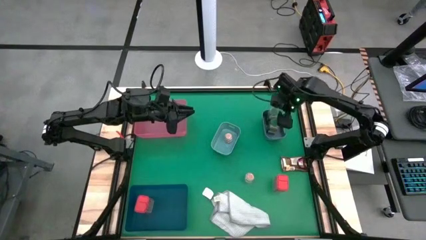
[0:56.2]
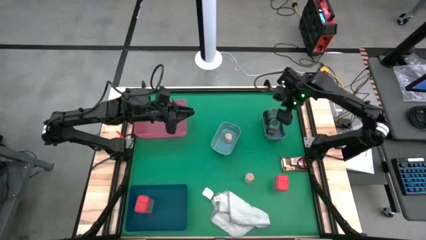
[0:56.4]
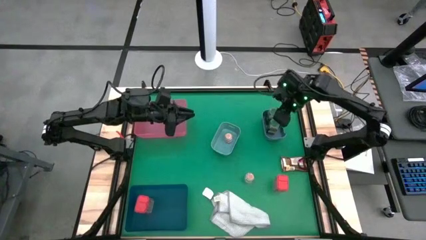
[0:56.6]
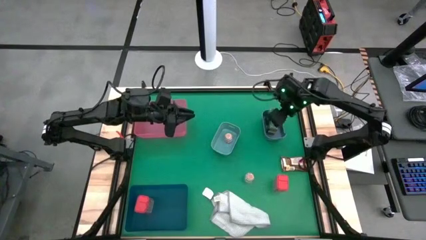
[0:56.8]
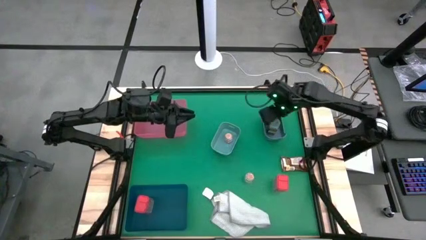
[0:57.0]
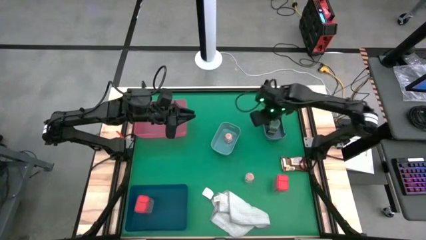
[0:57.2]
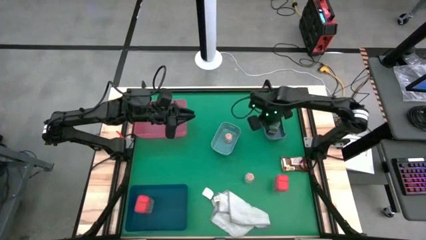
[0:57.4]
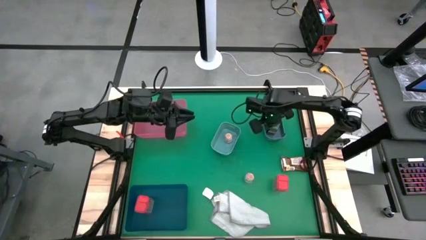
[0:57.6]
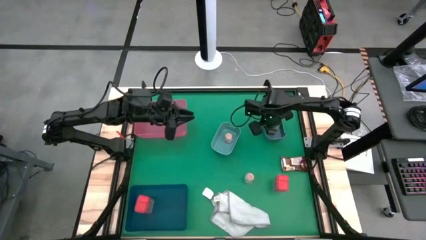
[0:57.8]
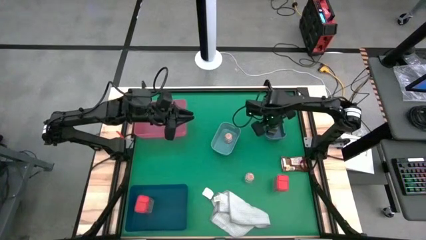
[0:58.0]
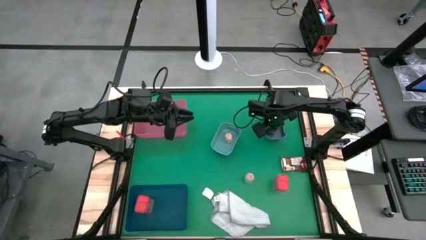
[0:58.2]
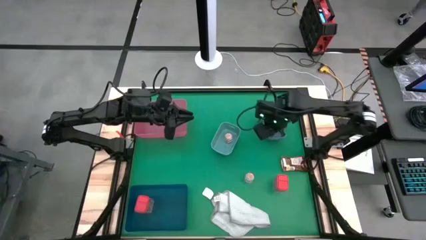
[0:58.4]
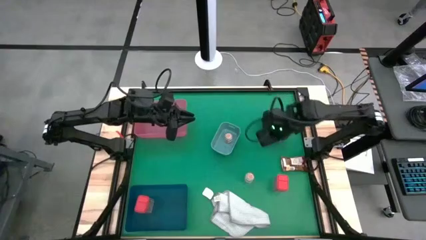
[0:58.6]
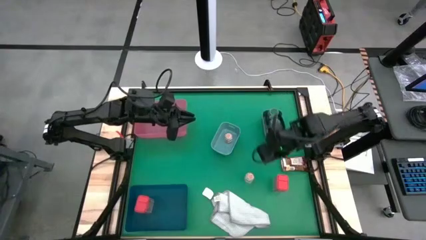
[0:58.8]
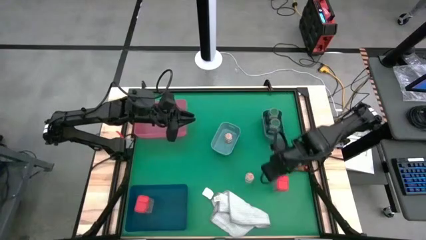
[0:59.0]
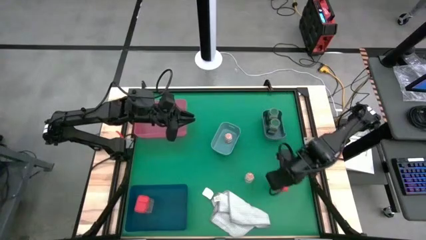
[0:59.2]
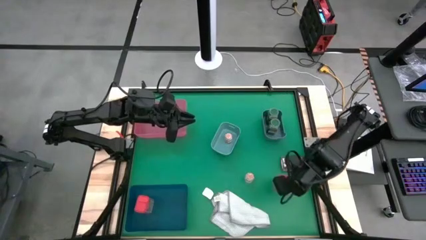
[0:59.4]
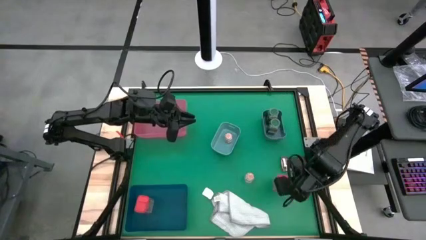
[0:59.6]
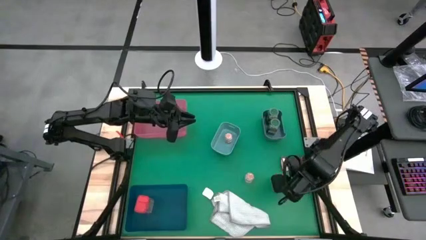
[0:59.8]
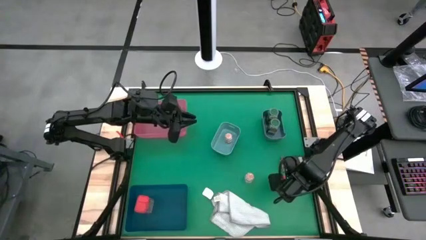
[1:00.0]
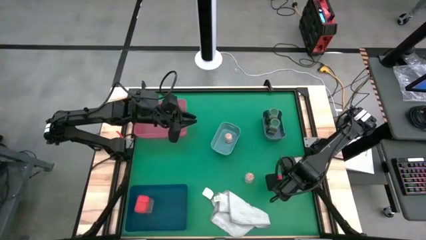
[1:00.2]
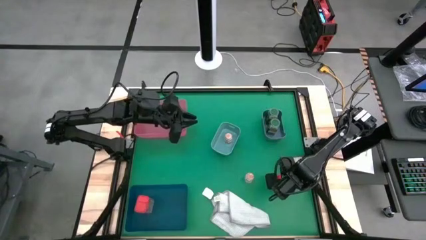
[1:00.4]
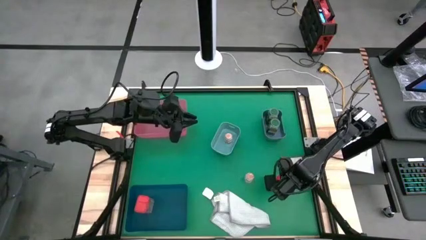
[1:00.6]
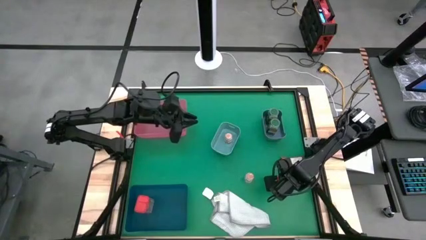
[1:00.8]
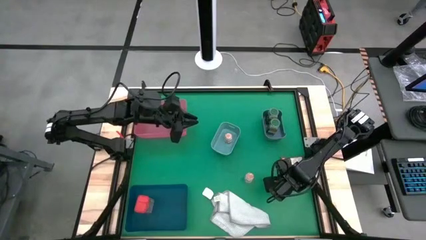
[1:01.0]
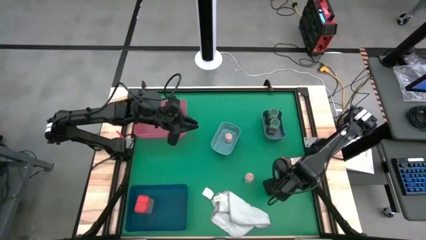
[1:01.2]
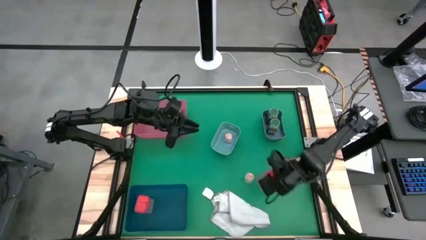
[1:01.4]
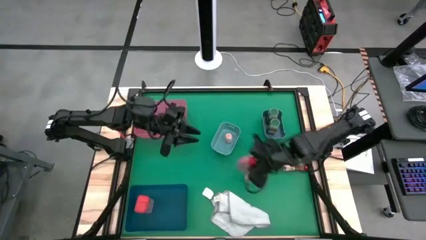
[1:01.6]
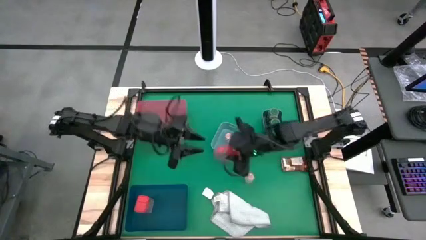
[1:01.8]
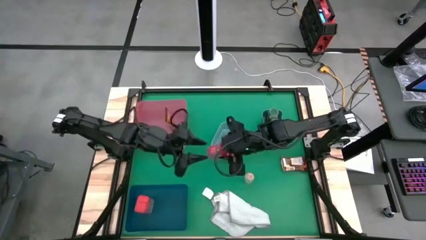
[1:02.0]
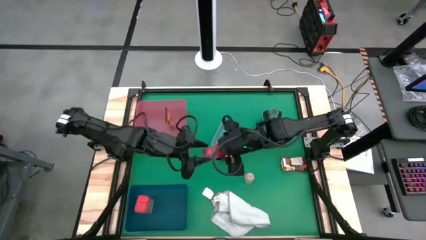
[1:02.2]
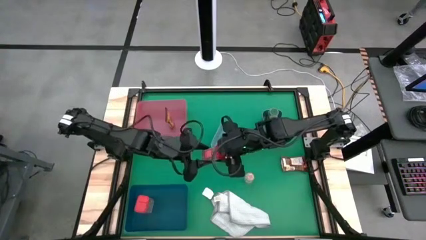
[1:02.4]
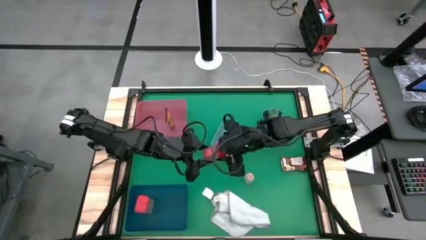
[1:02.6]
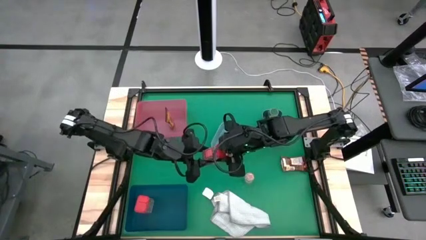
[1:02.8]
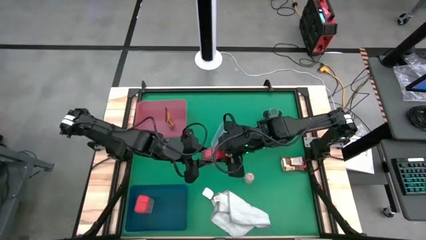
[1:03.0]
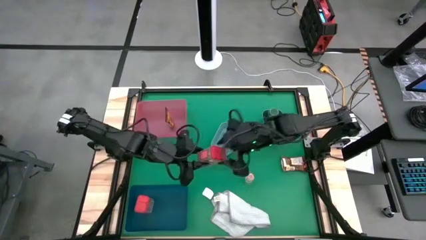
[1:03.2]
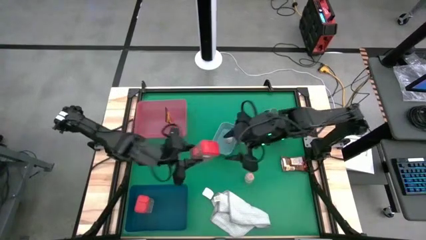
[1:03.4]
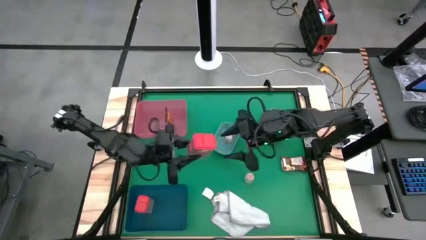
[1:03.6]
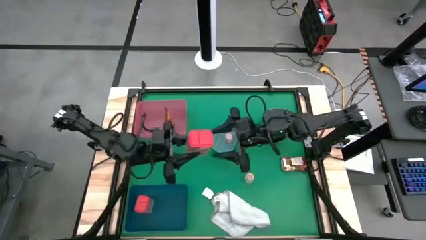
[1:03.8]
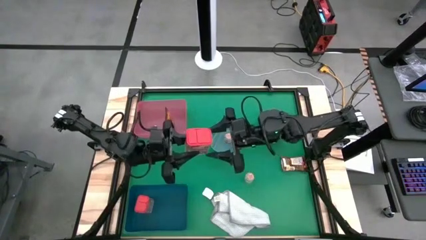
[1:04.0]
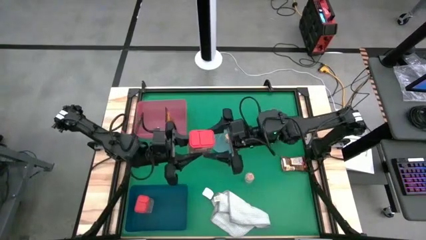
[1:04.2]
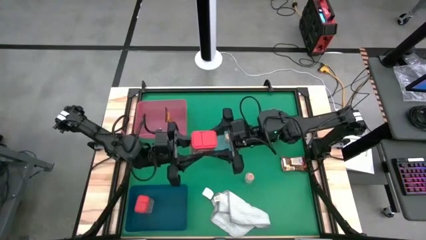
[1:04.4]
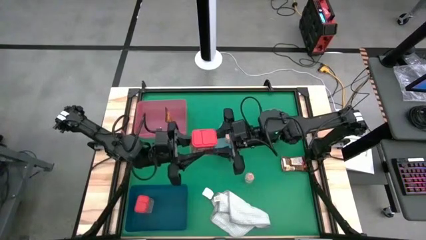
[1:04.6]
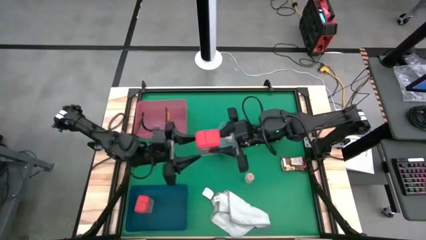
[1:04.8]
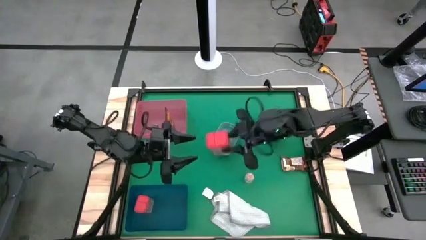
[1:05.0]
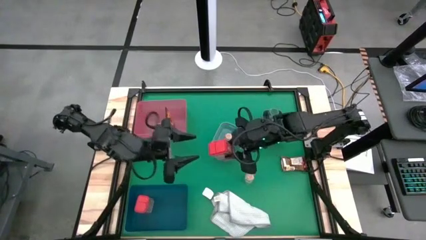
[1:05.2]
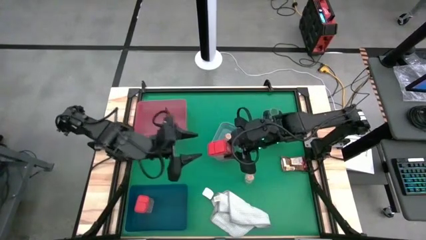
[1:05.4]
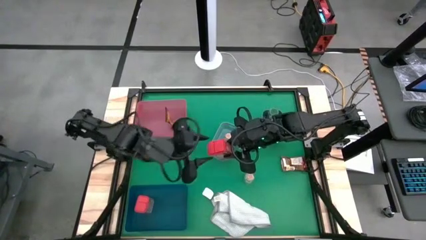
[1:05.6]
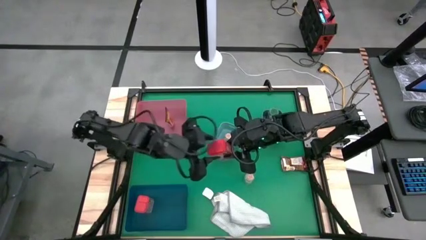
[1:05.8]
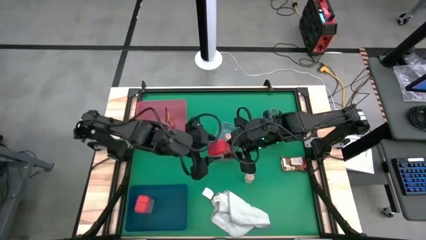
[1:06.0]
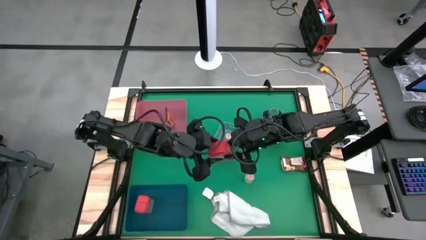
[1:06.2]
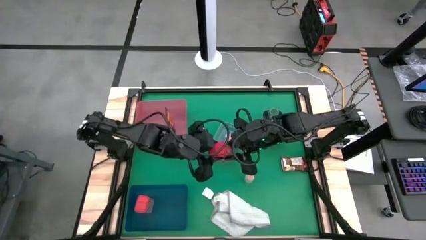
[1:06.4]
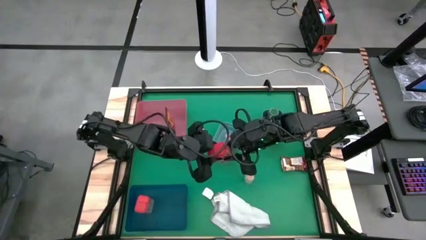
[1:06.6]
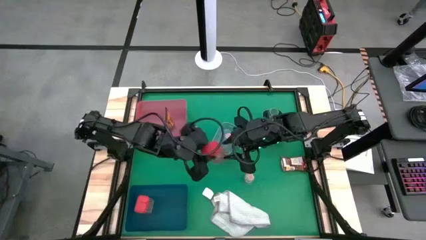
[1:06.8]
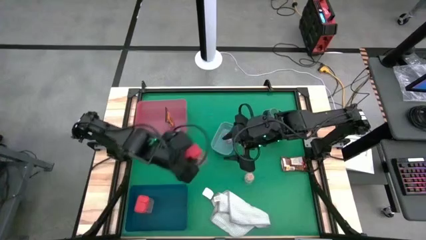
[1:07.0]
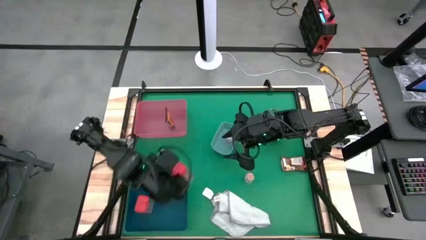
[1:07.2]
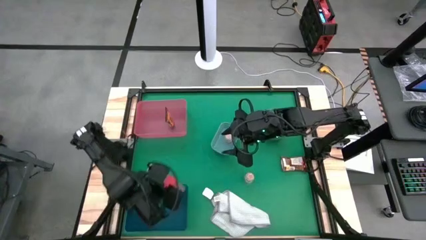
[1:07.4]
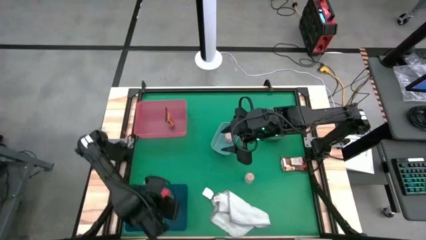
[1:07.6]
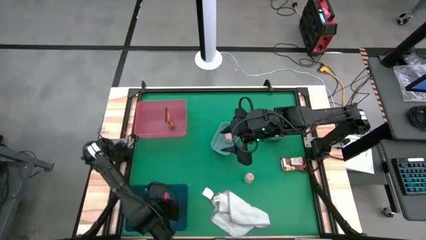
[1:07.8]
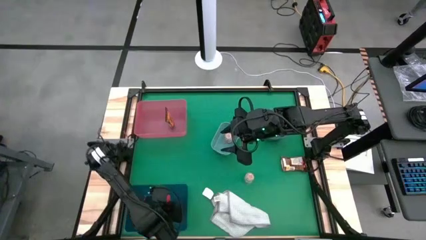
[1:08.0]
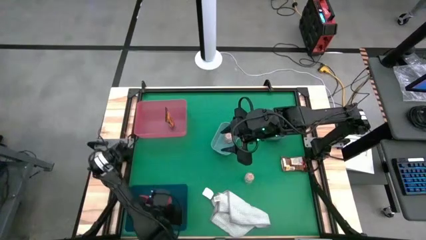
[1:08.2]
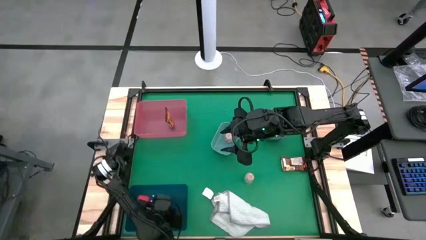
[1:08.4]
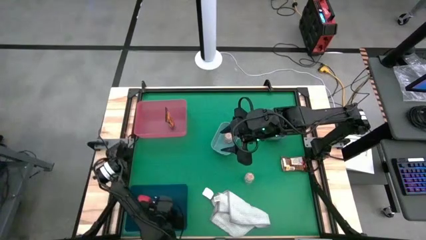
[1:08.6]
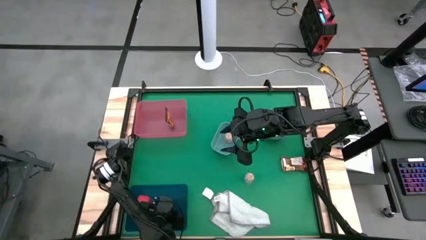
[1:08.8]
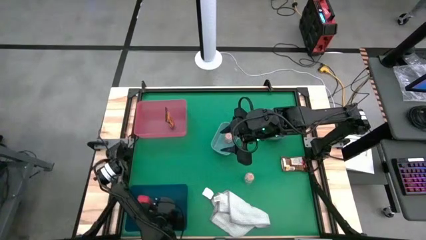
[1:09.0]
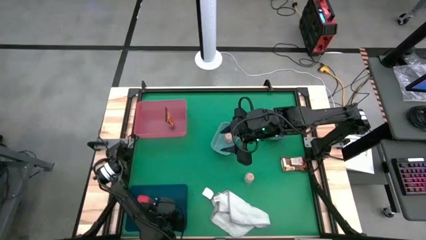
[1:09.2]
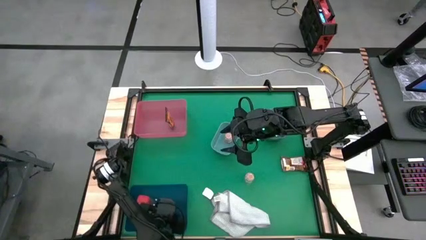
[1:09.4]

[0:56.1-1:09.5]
Task: Sort spices by type
Put the red seasoning can into the dark blue bin

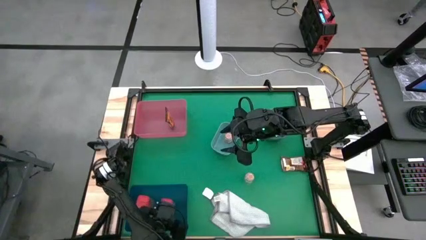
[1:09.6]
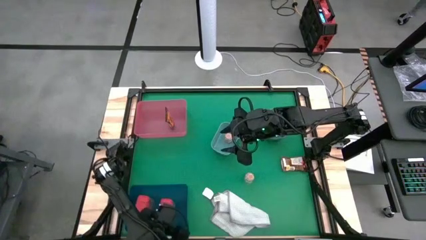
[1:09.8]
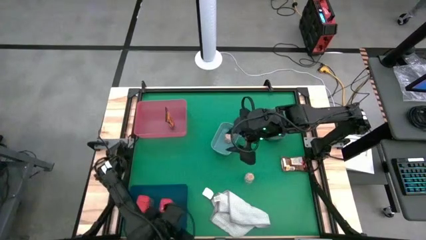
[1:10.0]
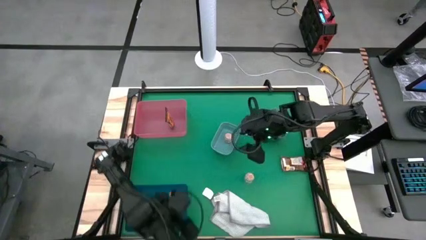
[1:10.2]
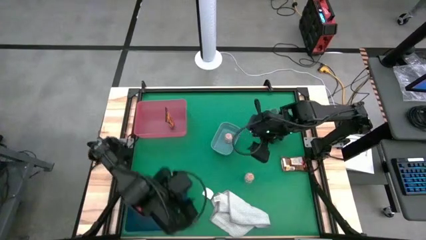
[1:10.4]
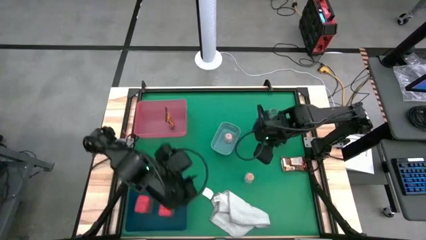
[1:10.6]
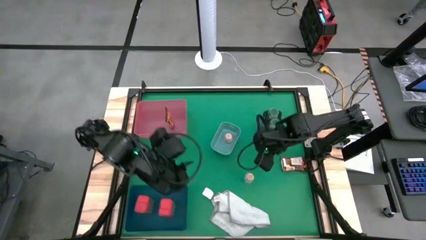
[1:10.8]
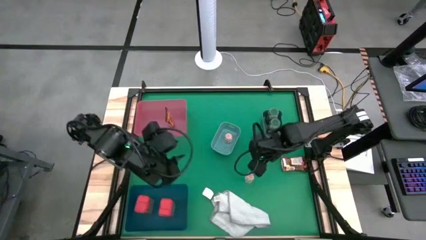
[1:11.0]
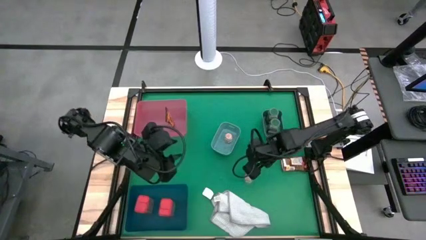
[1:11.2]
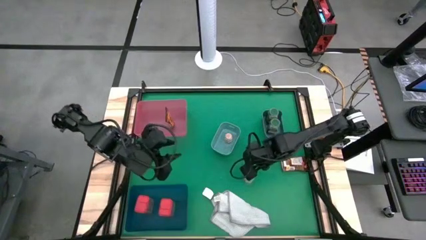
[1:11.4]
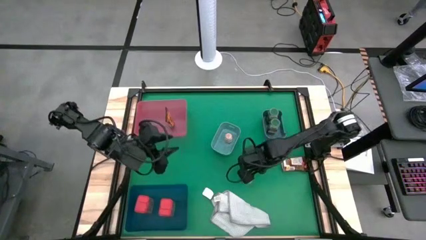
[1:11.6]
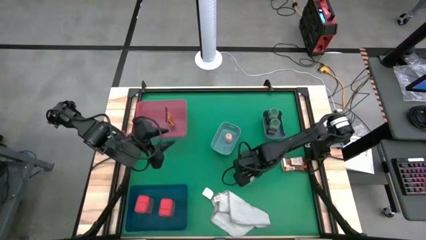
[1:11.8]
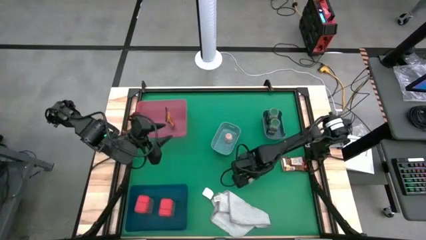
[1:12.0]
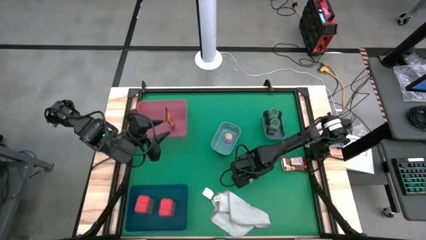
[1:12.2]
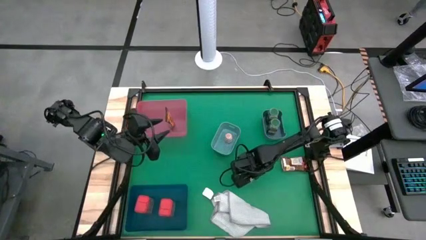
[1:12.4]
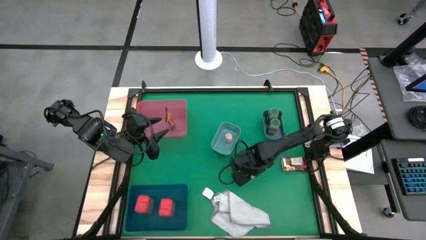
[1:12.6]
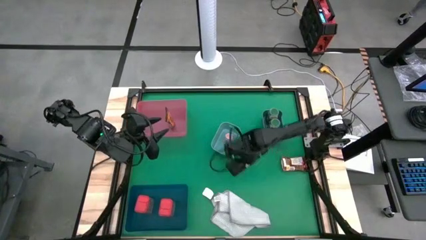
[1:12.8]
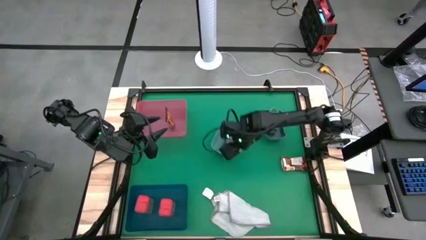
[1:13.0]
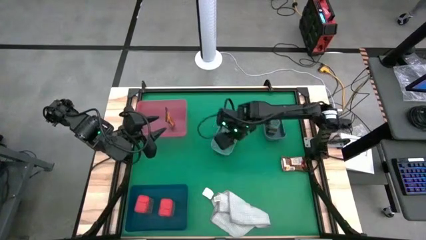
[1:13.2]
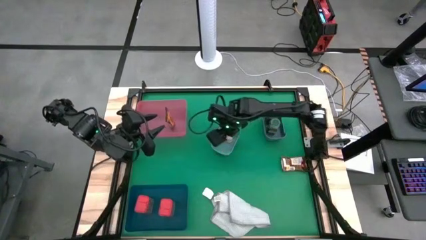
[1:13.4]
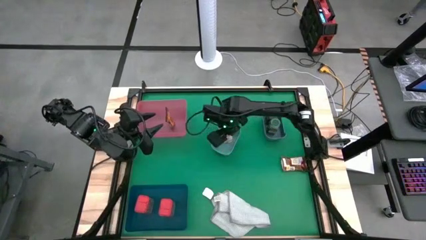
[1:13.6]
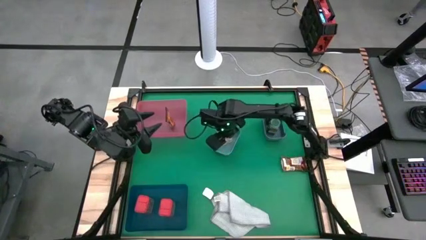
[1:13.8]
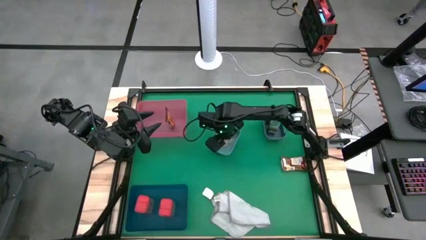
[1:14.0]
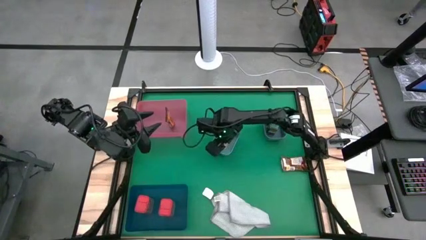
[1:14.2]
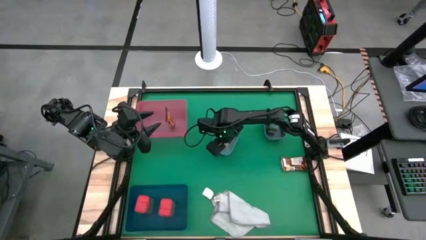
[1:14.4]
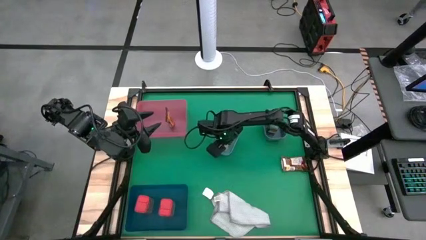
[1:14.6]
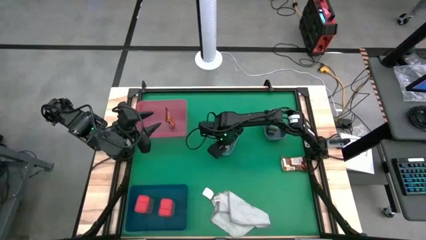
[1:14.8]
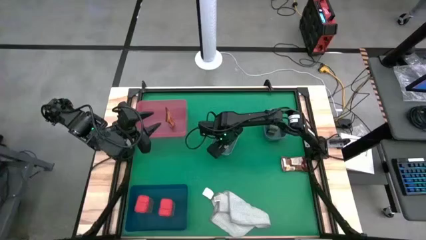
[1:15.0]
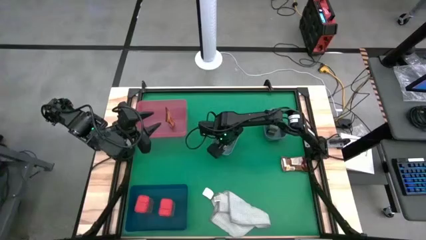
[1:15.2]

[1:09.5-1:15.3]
Put the brown seasoning bottle into the light blue bin
